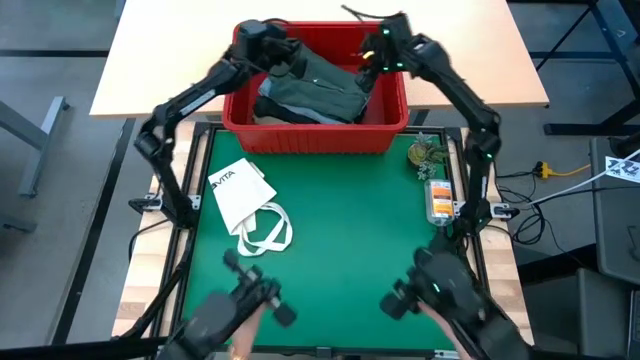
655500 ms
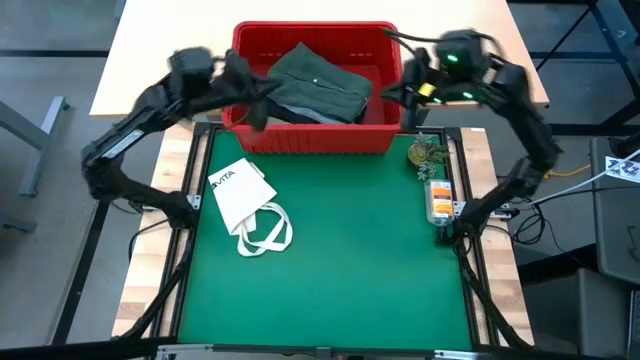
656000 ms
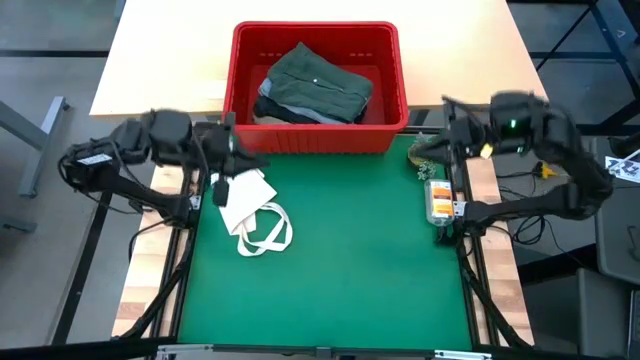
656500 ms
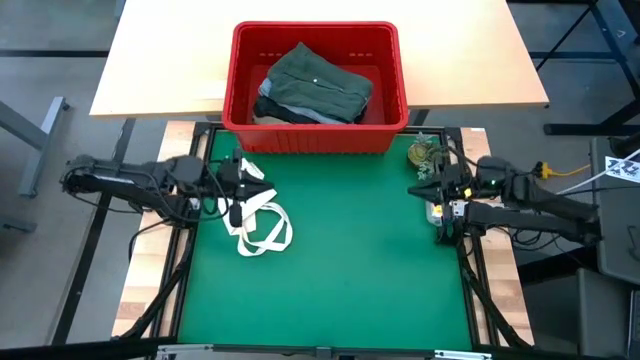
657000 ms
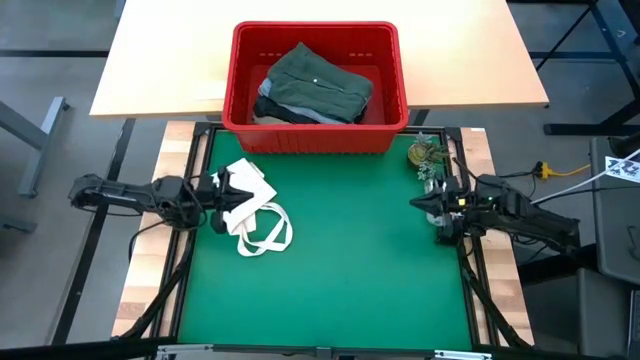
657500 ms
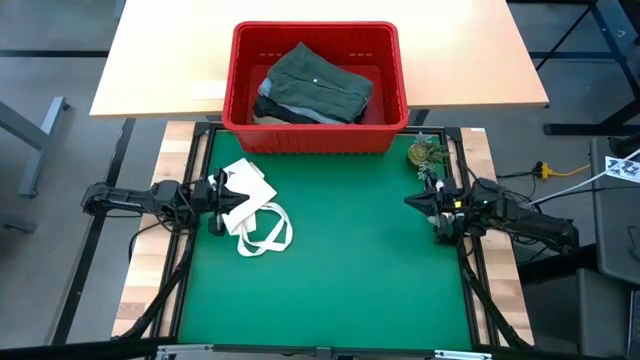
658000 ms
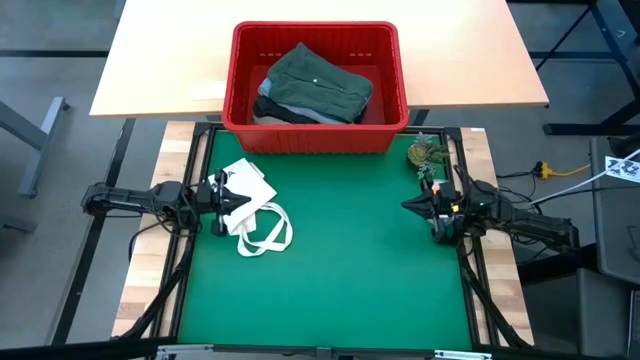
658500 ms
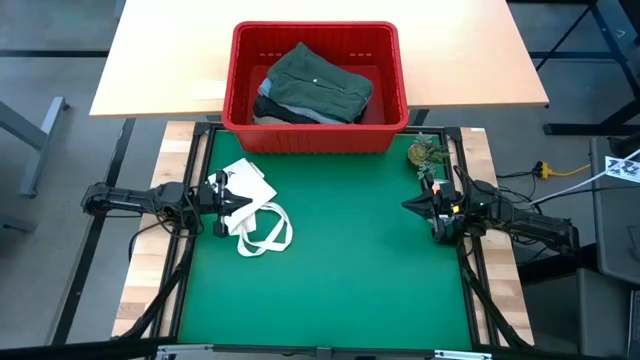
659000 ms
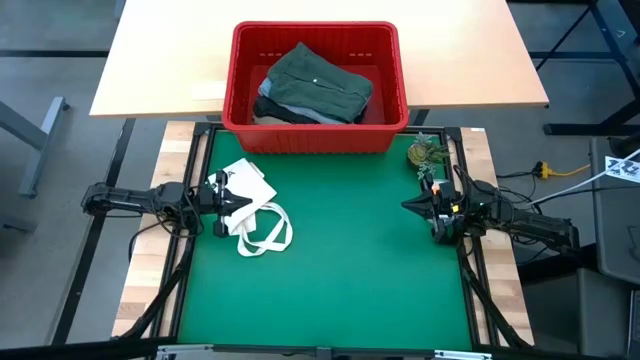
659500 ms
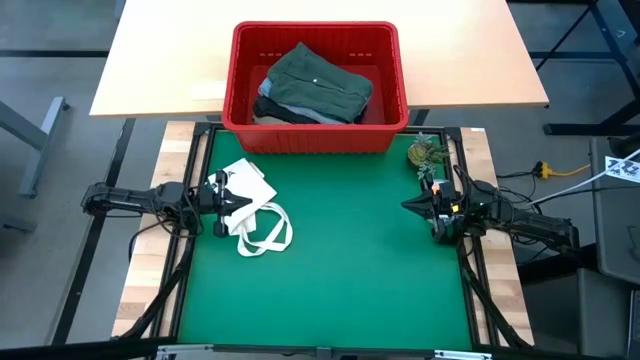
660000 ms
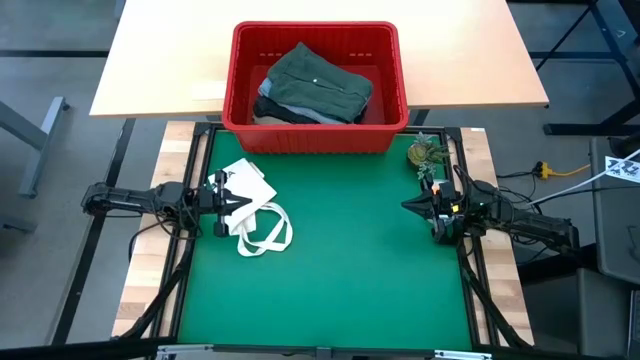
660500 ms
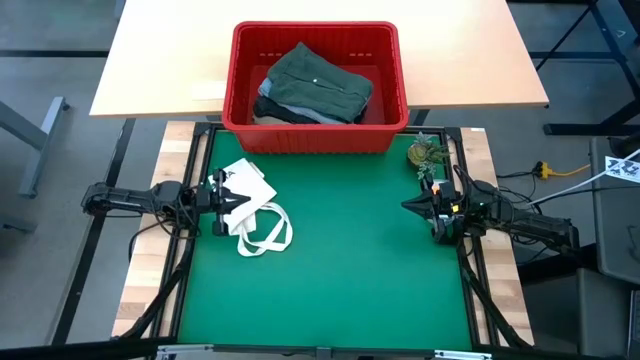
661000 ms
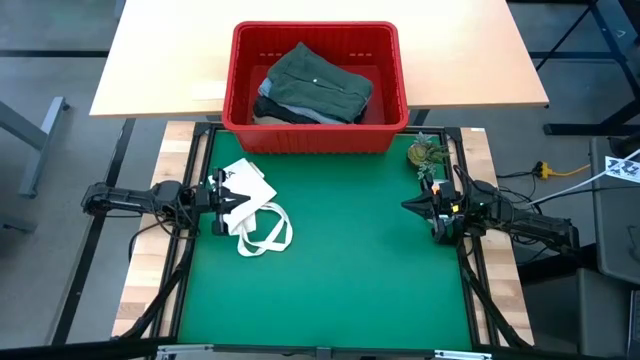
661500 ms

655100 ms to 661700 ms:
Task: Fold Laundry from Bin
Return to Home Position

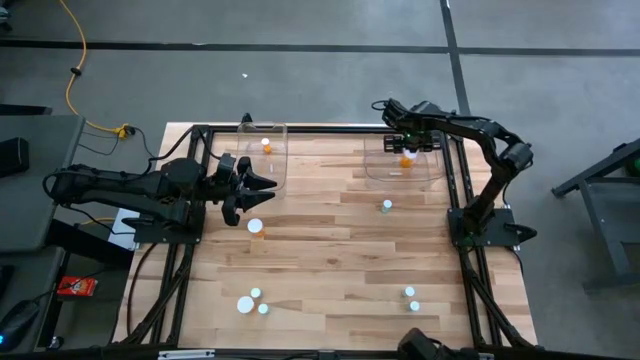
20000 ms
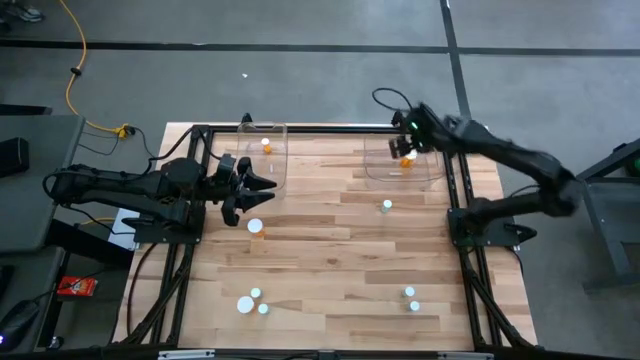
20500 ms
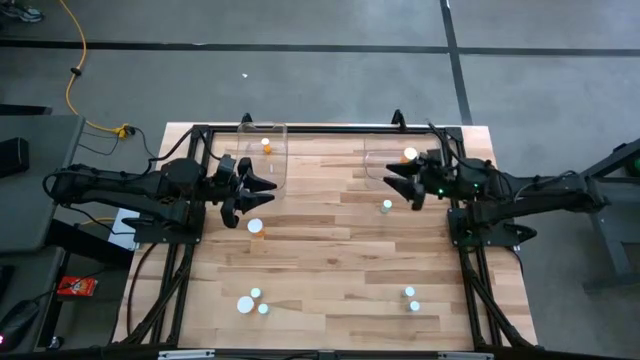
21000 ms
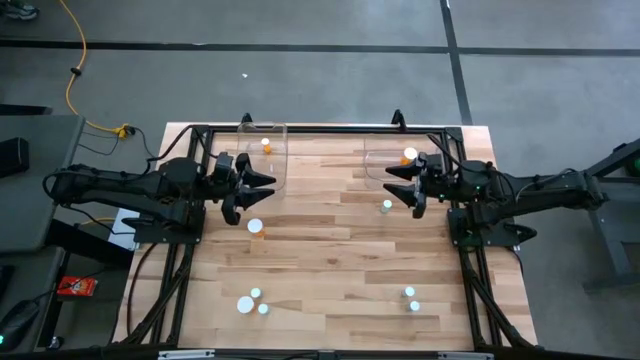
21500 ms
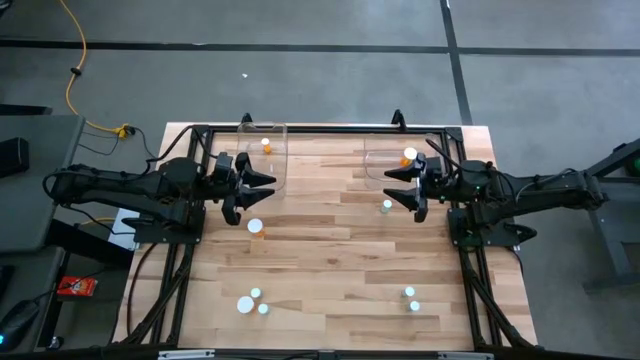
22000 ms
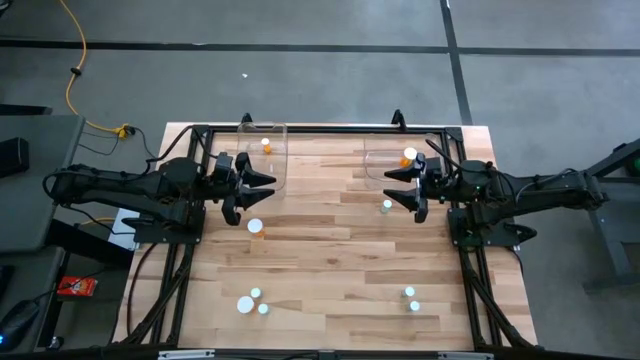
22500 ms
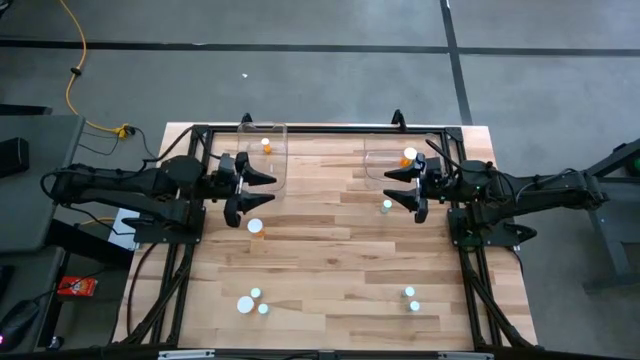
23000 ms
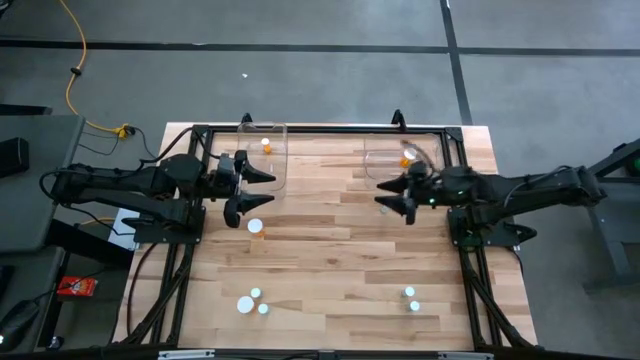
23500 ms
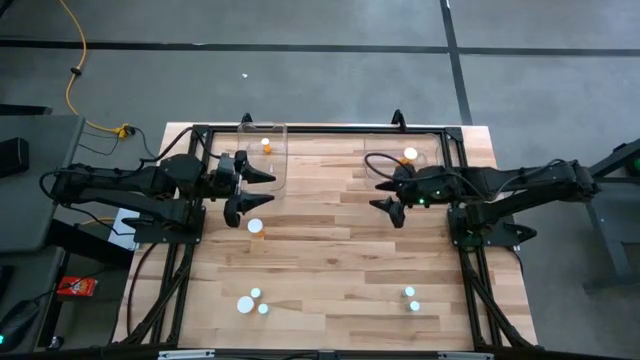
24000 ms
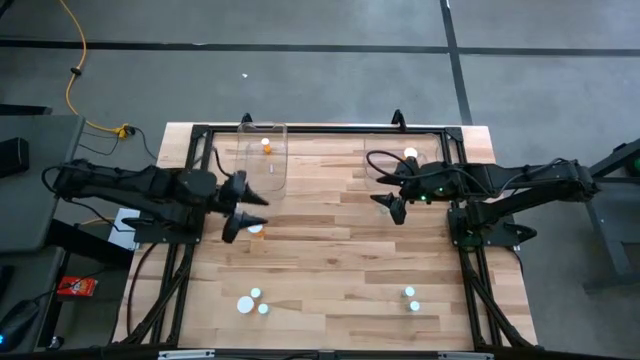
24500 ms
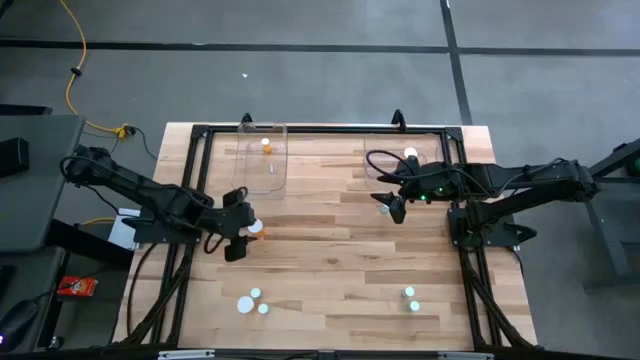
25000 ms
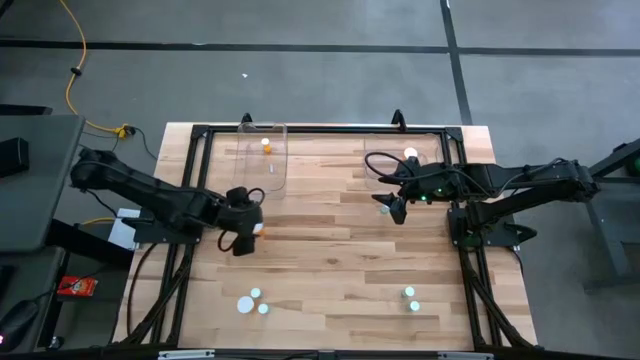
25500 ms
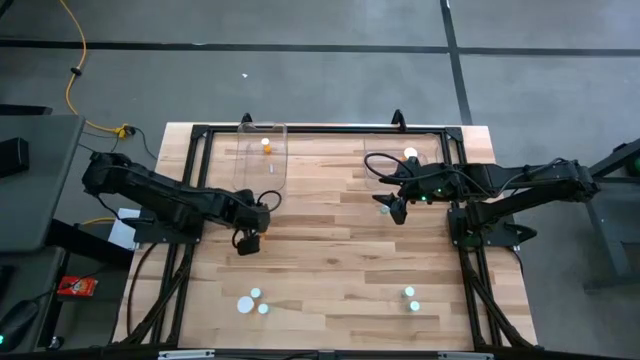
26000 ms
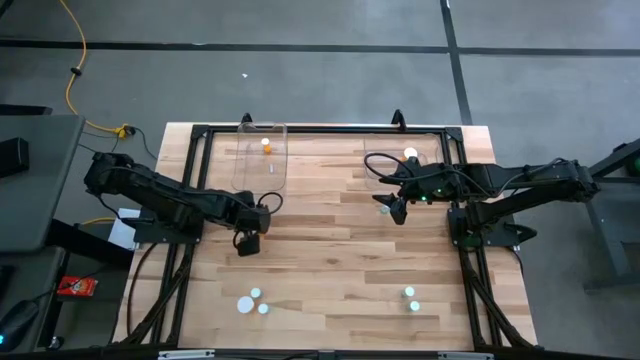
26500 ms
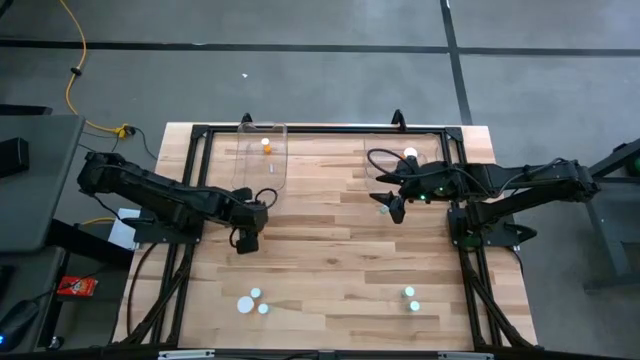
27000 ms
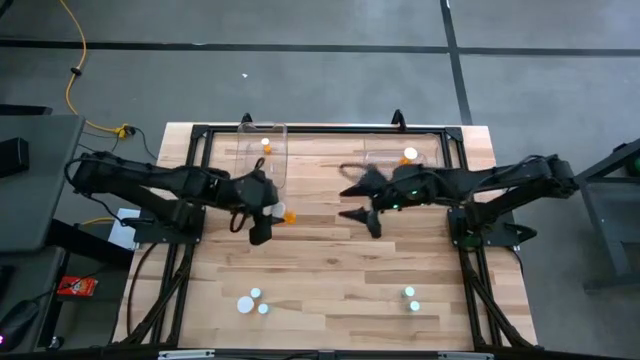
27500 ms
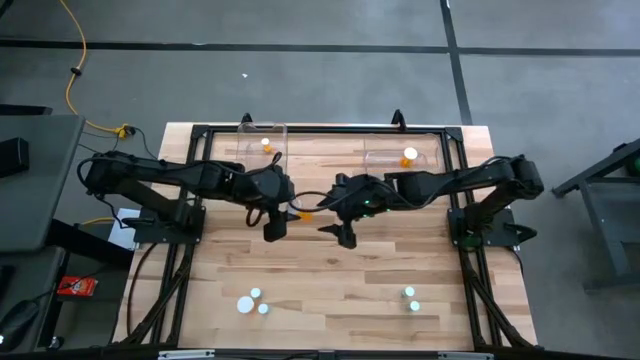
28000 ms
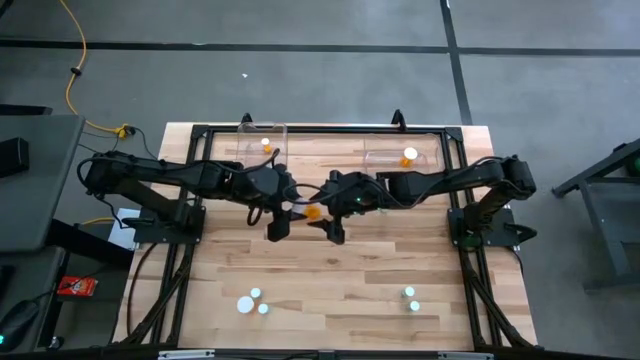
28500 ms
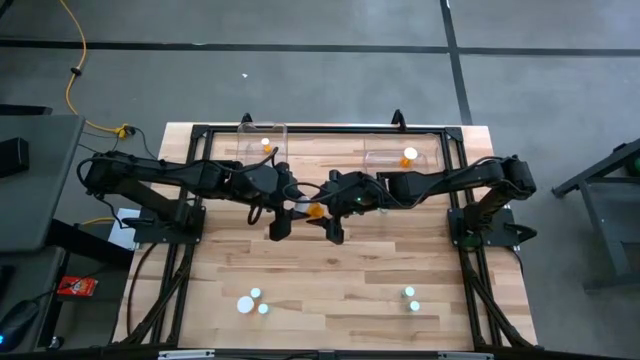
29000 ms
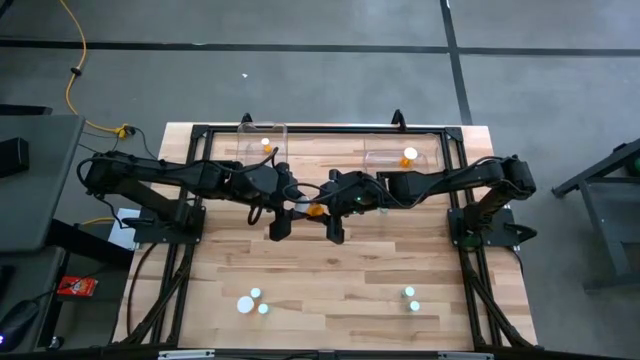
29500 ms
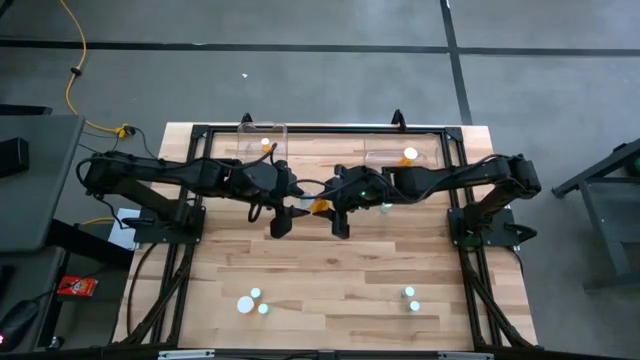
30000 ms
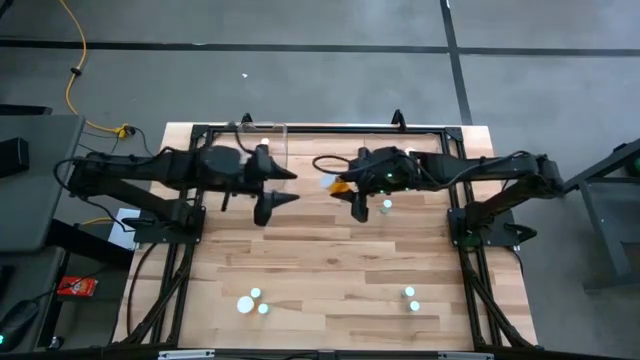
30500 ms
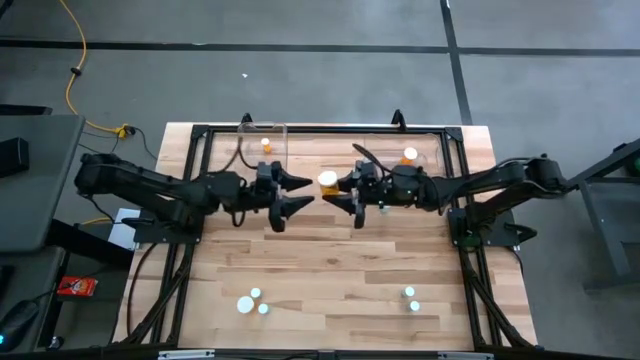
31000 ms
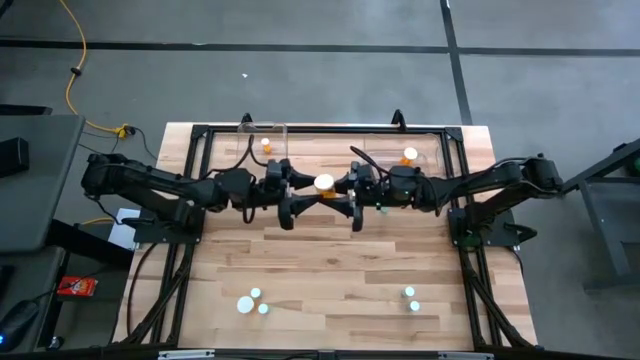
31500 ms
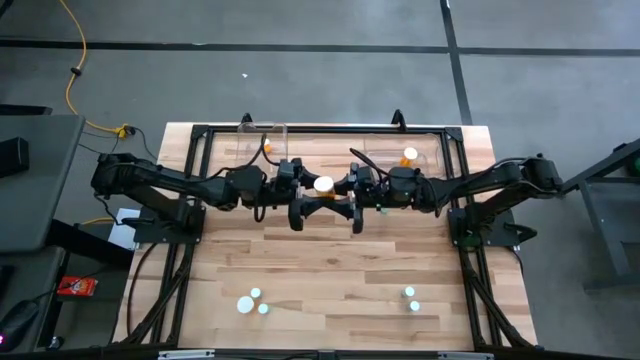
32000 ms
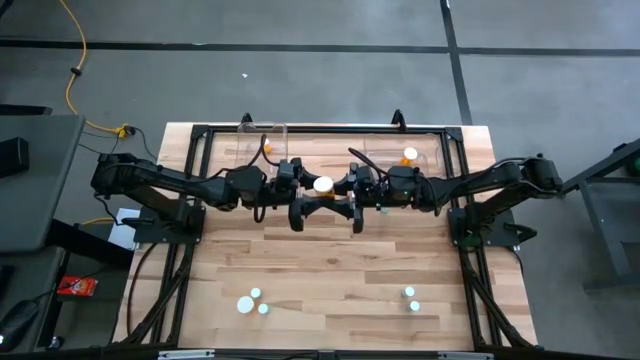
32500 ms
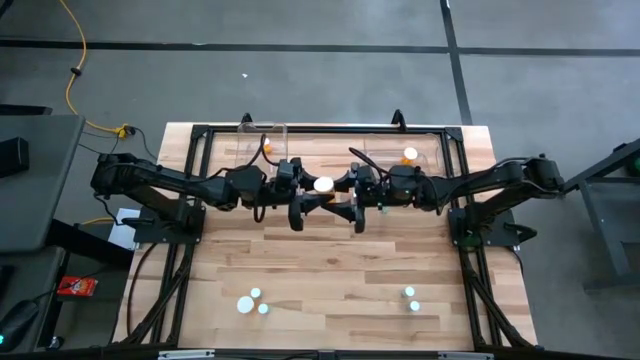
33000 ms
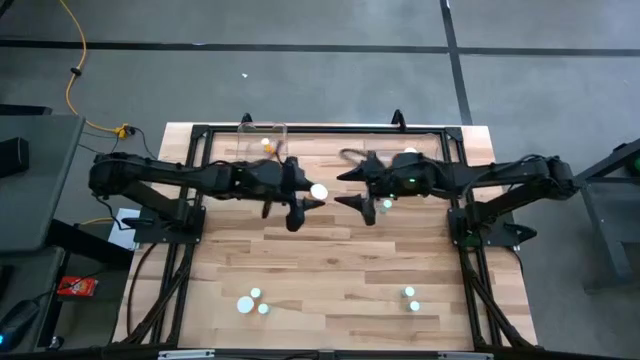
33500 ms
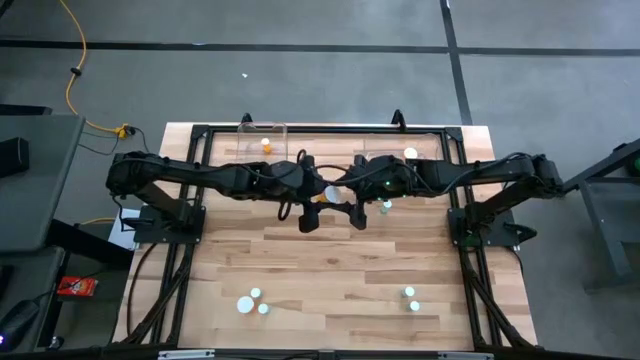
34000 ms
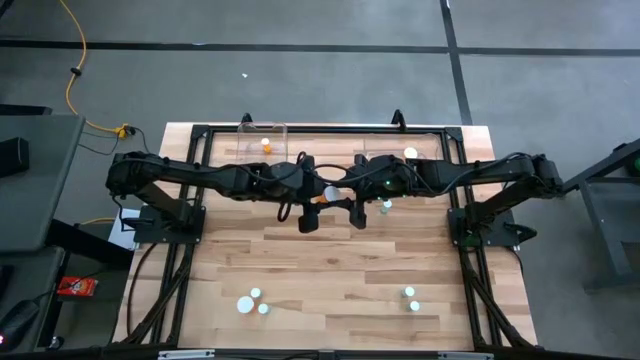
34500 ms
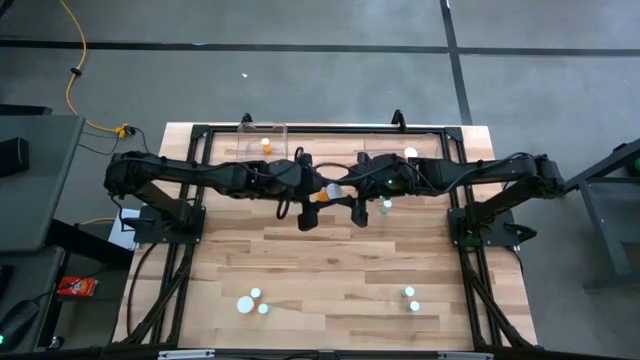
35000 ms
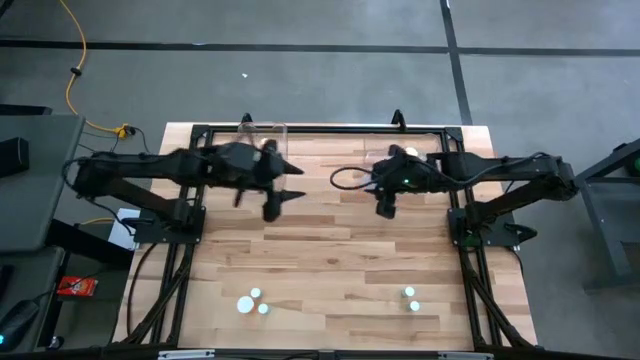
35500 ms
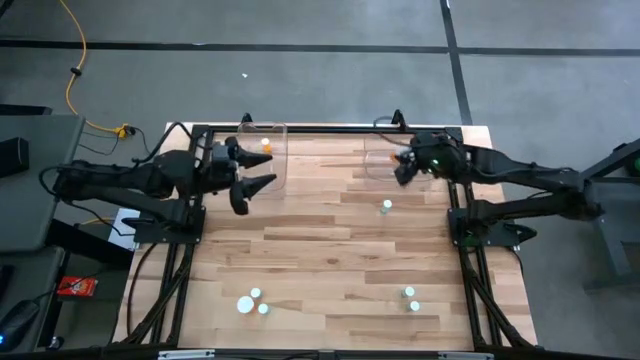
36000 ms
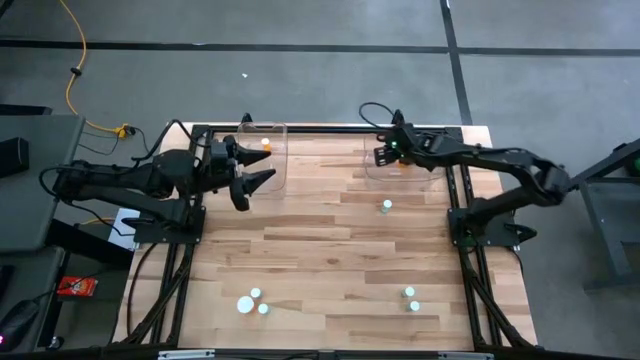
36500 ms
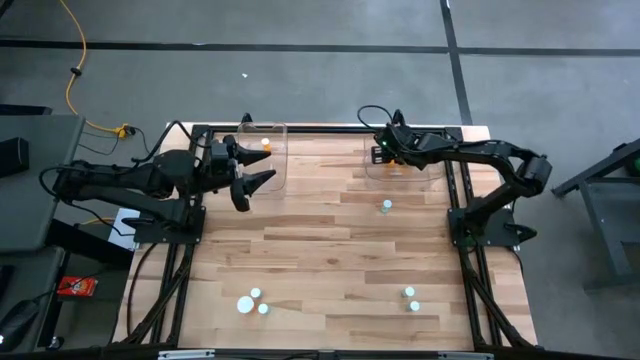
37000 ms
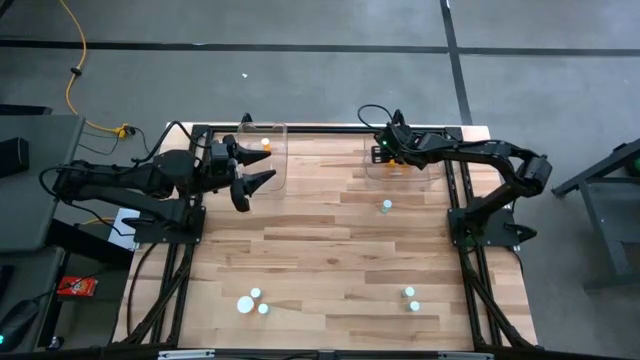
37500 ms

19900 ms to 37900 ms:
Task: Pick and place medicine bottles into bin by pill shape (circle, oval)
Put the large orange pill bottle into the right transparent bin
